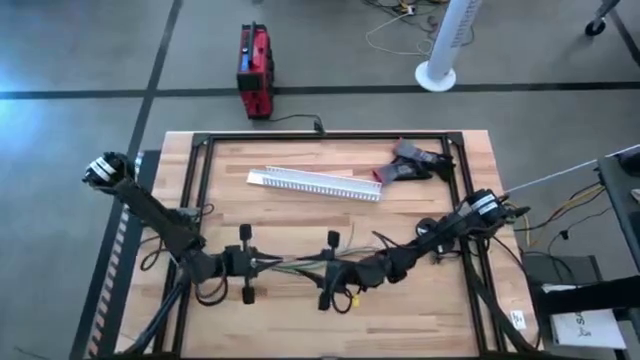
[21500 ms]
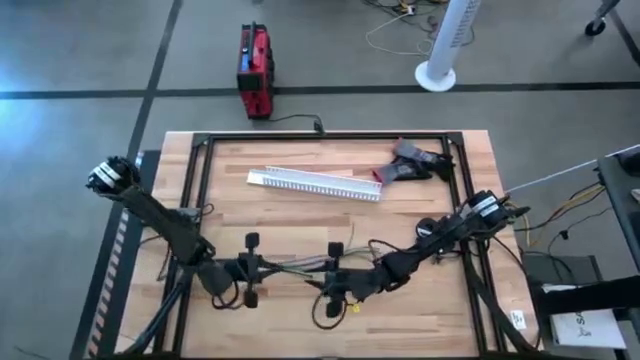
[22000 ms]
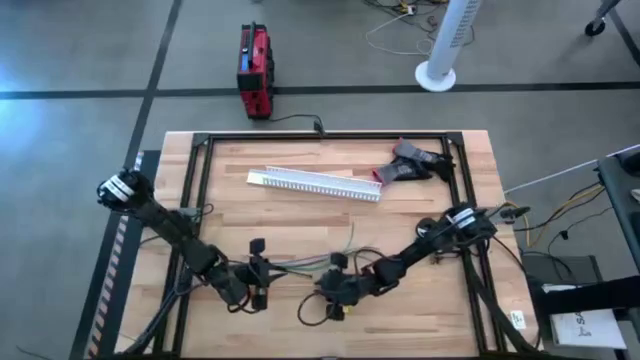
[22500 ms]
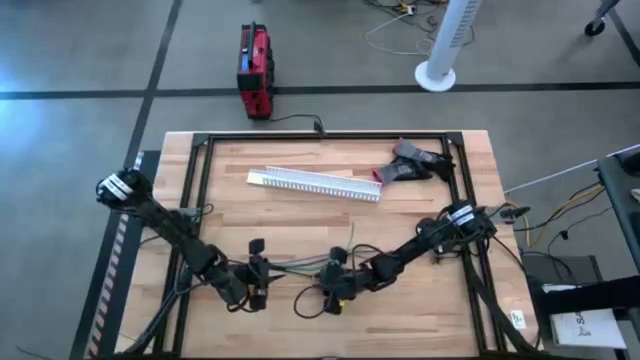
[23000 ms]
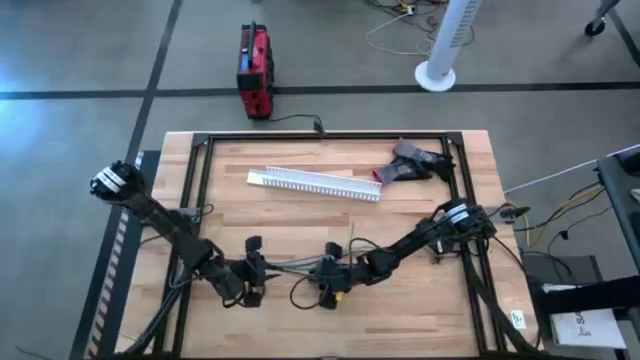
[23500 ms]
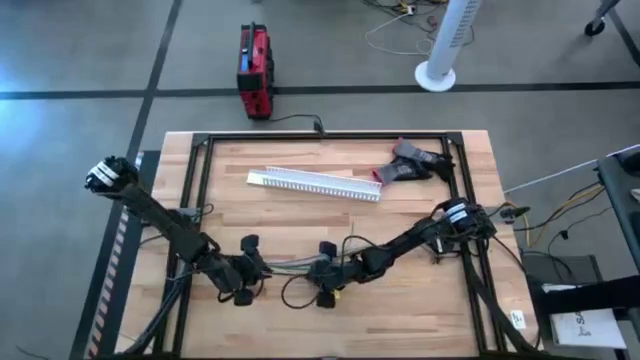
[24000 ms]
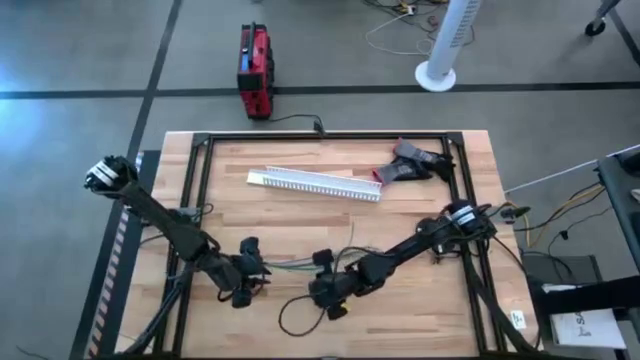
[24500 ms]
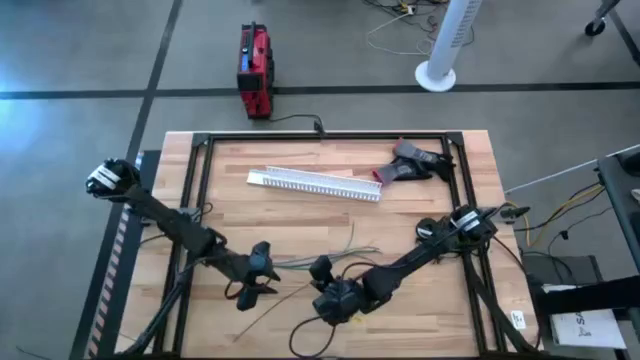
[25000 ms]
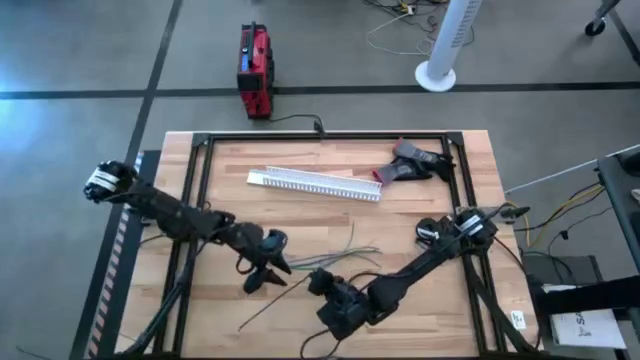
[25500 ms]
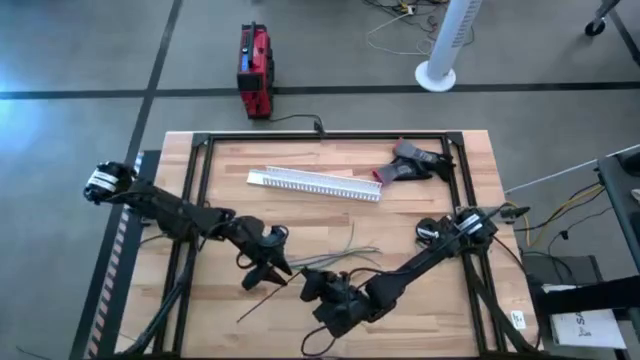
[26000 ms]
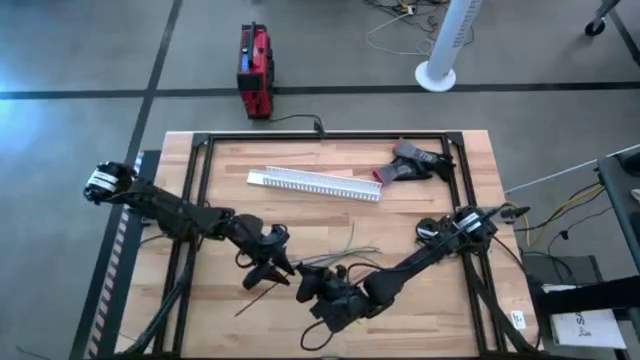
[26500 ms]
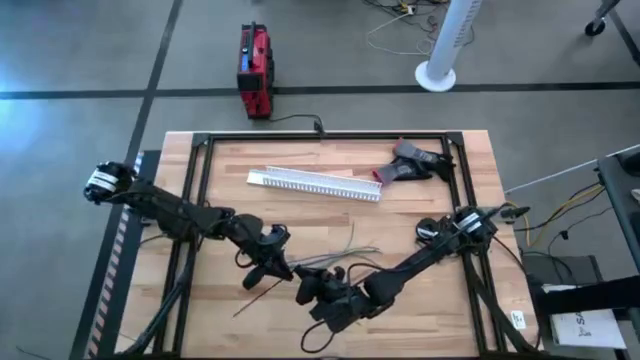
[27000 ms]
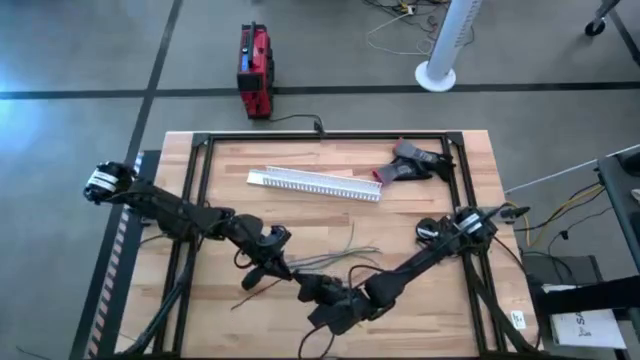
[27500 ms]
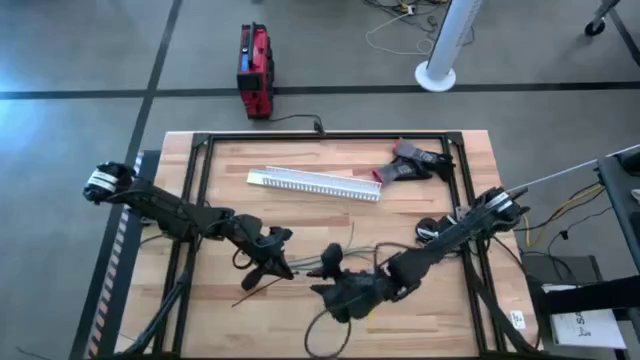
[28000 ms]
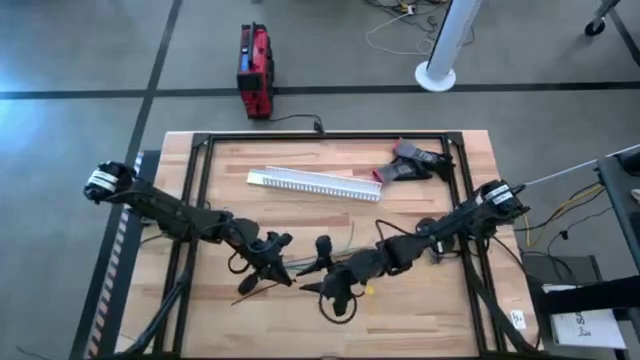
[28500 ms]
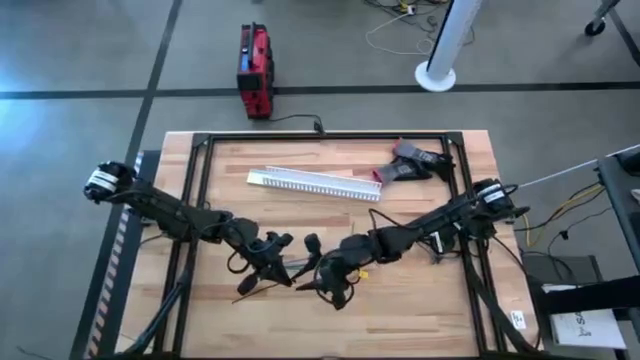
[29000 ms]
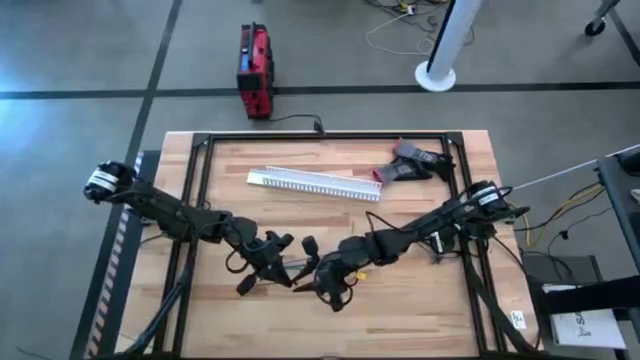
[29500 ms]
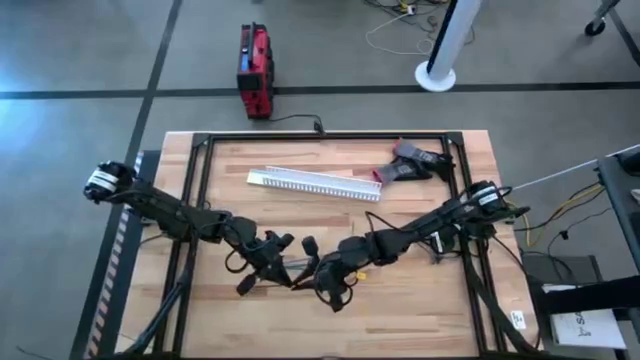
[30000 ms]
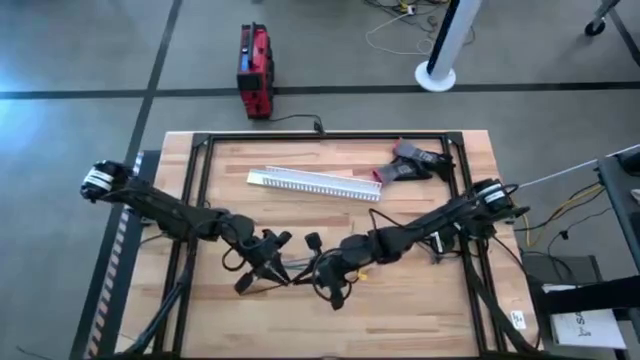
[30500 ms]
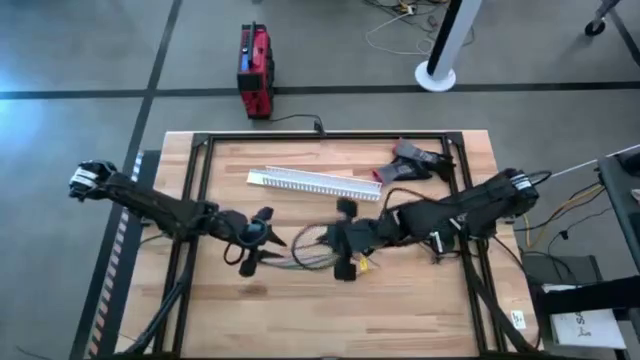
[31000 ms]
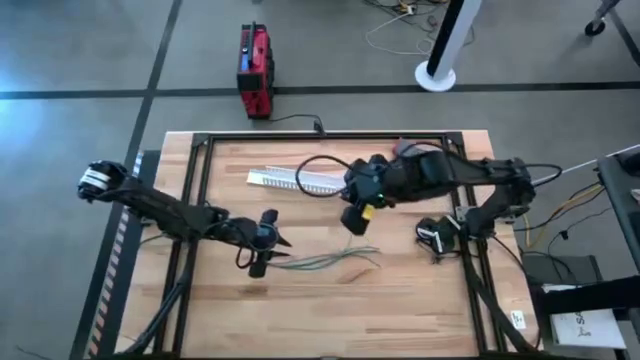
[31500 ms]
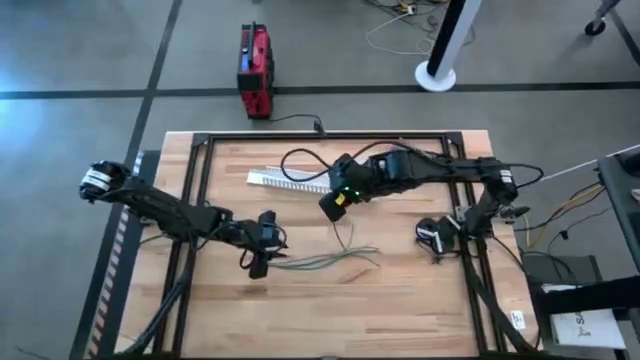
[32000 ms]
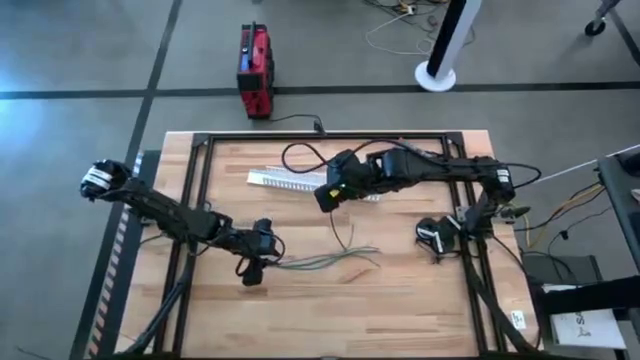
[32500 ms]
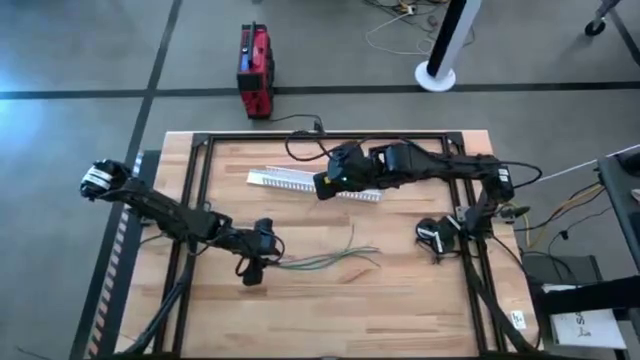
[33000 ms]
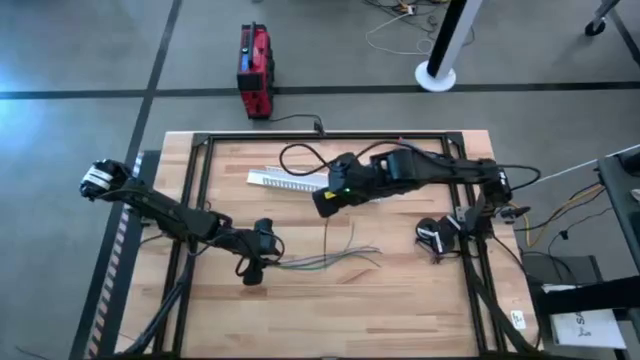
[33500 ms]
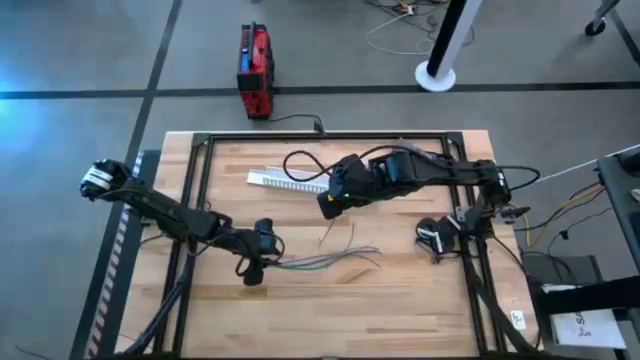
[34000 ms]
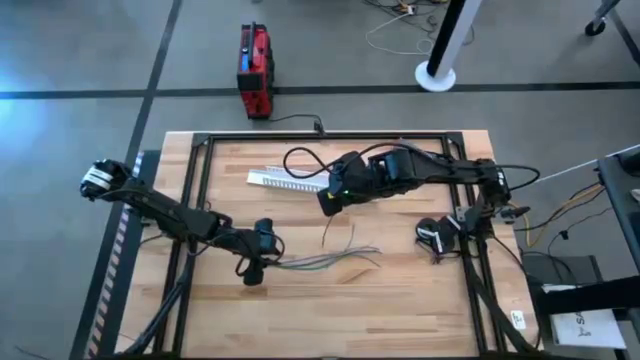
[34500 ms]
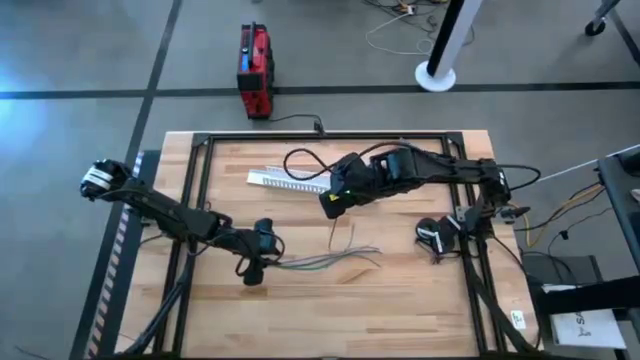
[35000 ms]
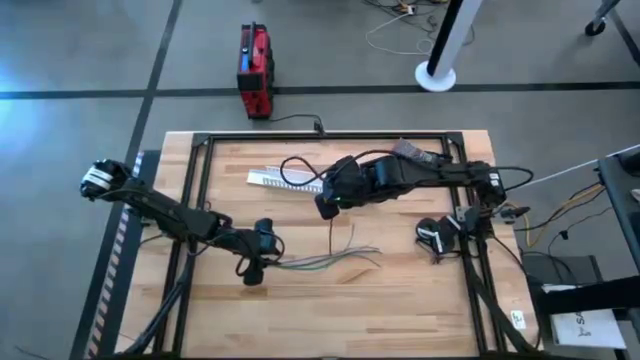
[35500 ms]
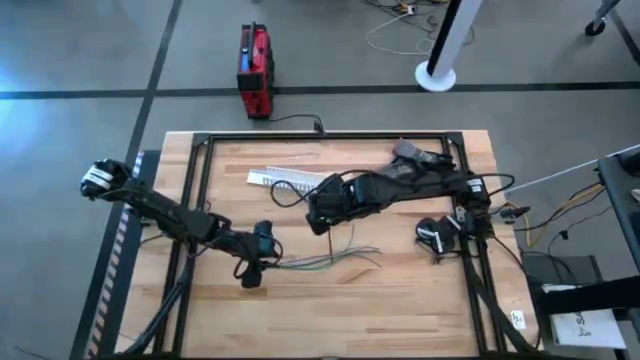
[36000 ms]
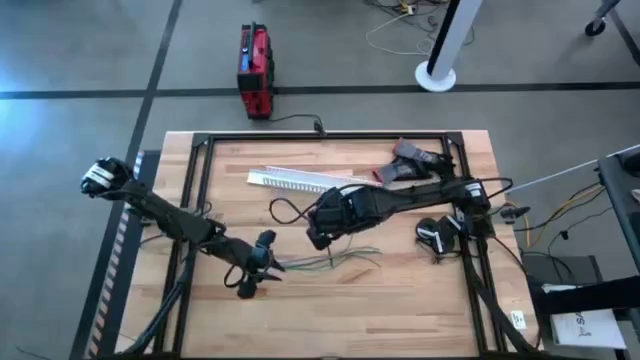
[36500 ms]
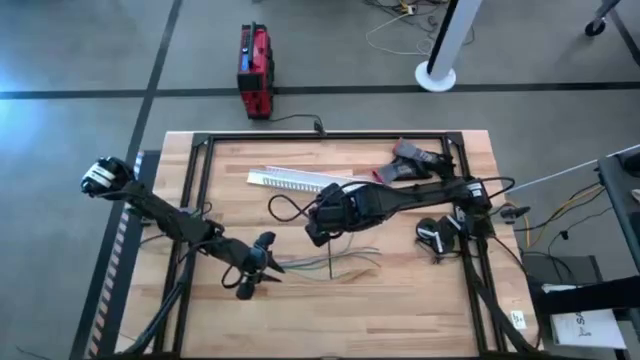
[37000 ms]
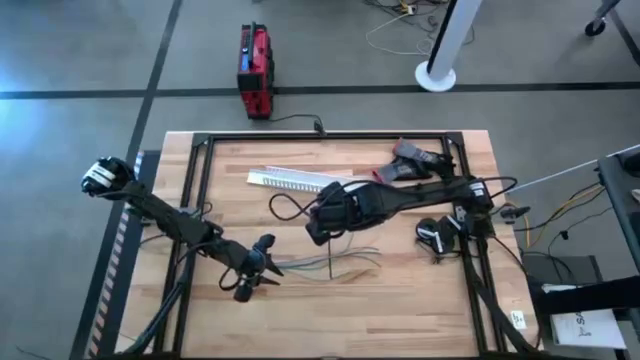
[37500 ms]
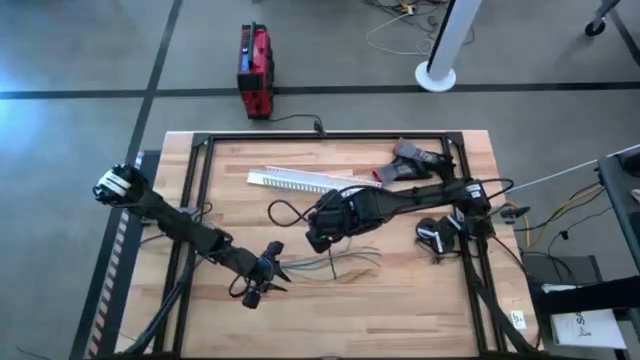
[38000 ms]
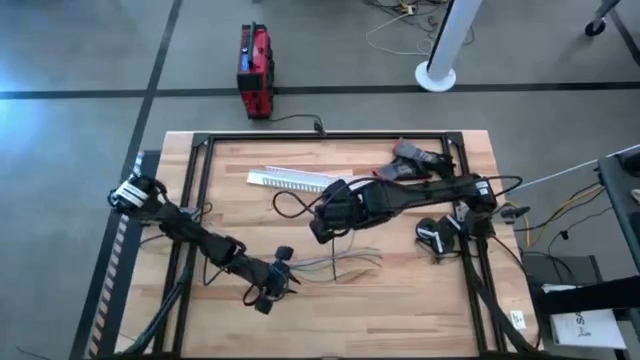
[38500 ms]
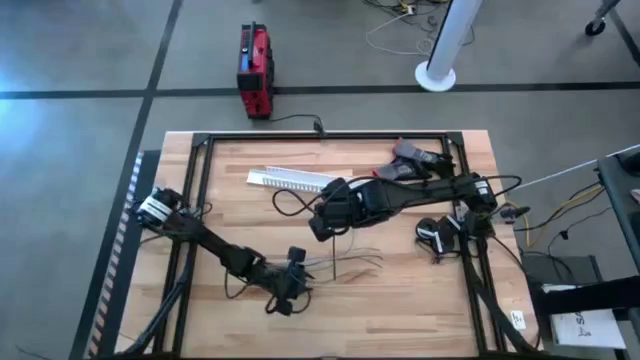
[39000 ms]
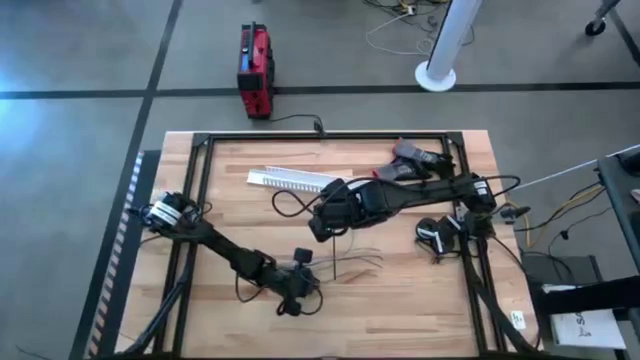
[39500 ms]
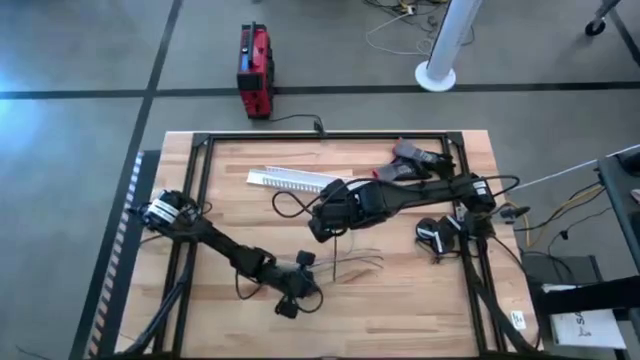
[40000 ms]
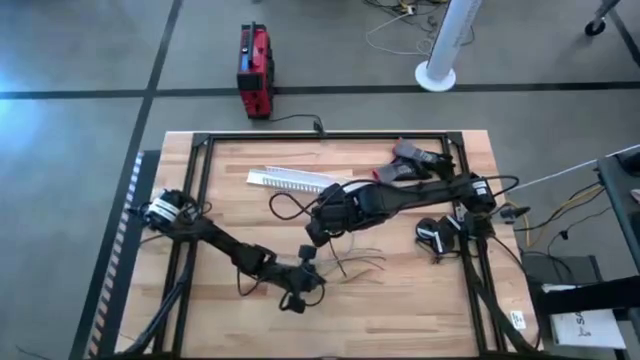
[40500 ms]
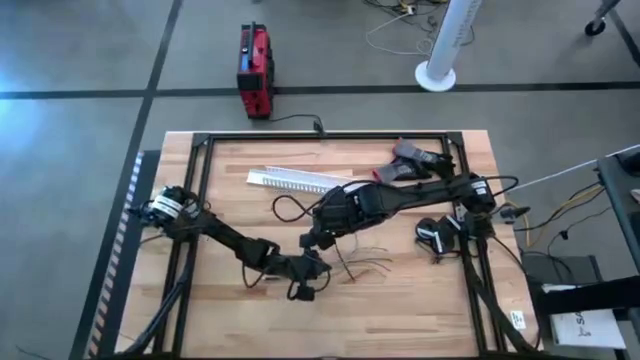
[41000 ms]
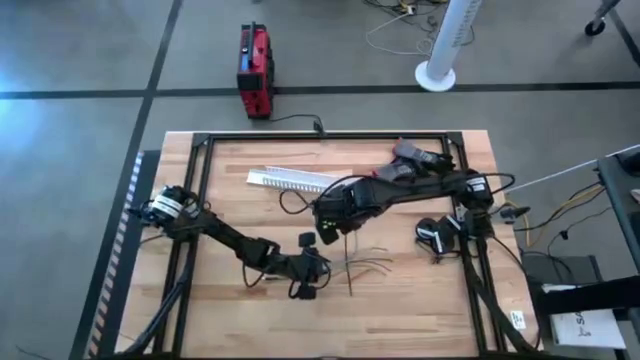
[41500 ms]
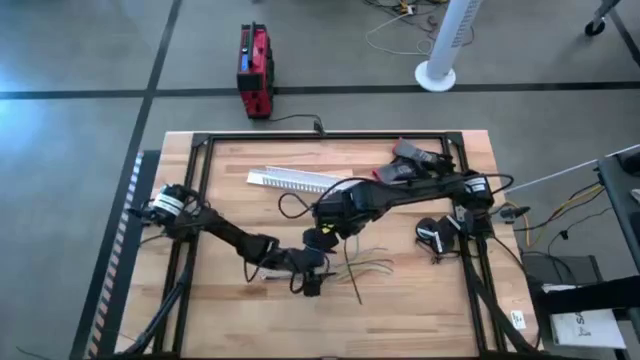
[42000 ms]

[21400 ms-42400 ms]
Task: Ziptie cables
Insert the black ziptie on the cable wires
